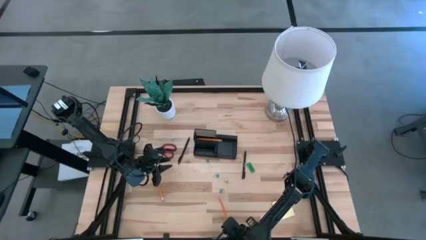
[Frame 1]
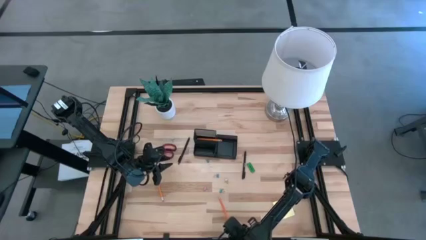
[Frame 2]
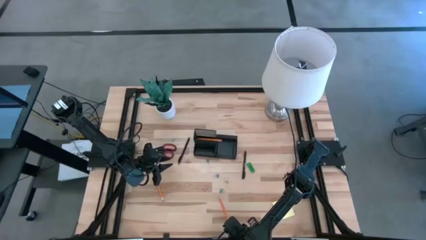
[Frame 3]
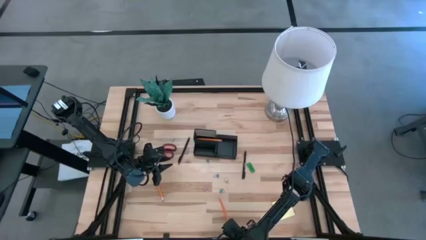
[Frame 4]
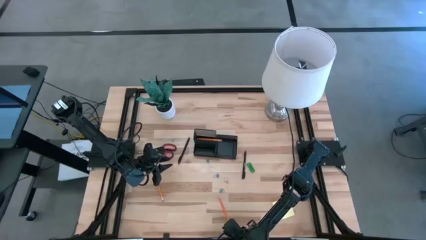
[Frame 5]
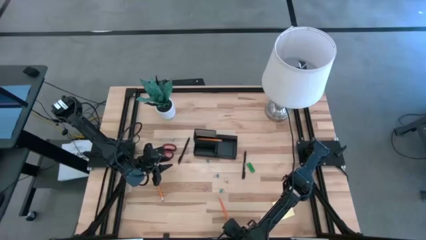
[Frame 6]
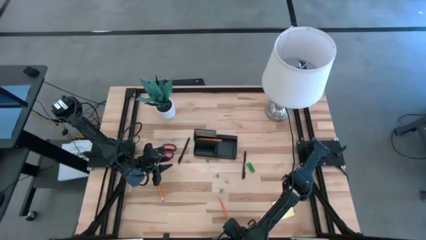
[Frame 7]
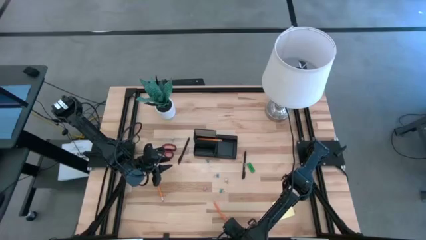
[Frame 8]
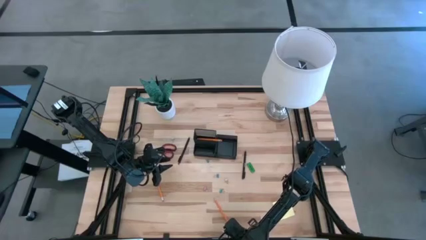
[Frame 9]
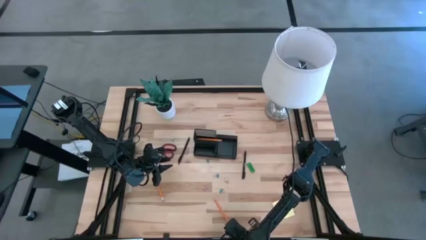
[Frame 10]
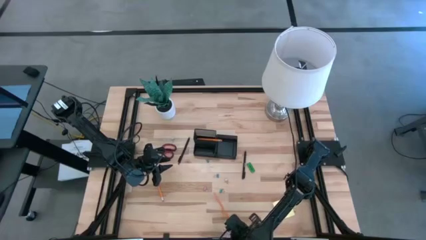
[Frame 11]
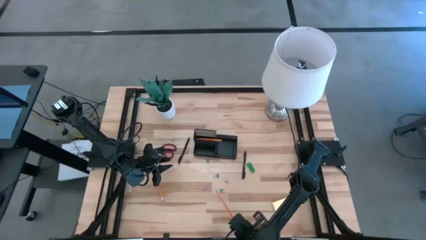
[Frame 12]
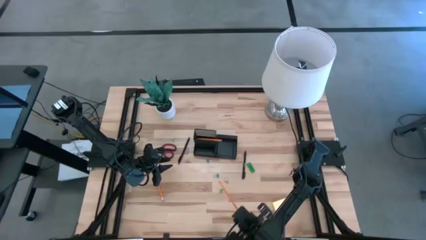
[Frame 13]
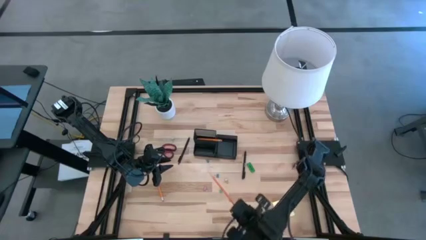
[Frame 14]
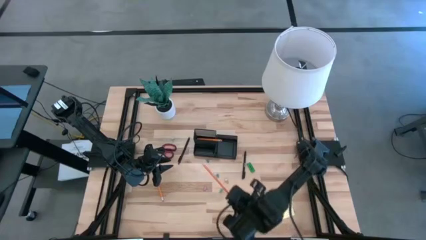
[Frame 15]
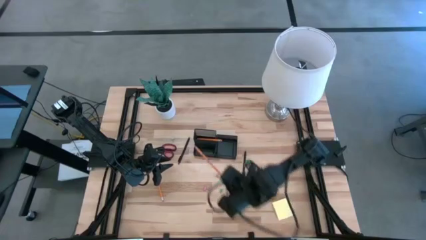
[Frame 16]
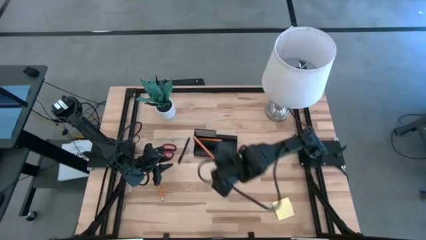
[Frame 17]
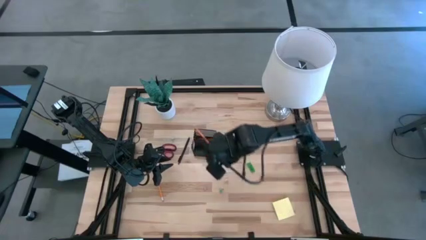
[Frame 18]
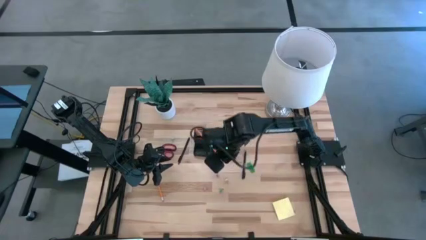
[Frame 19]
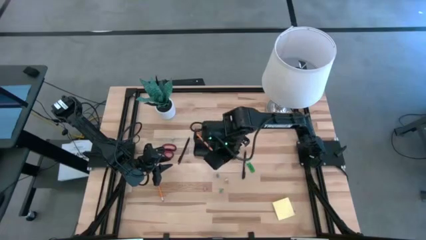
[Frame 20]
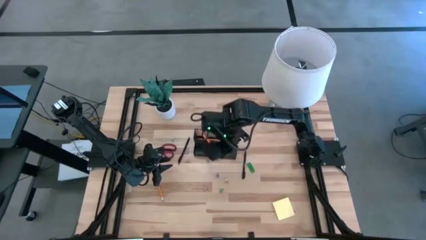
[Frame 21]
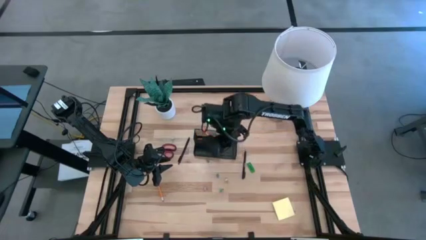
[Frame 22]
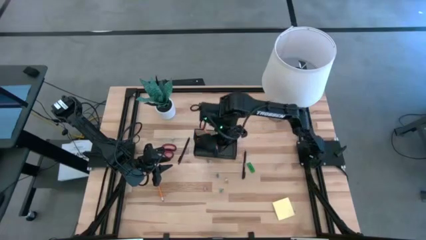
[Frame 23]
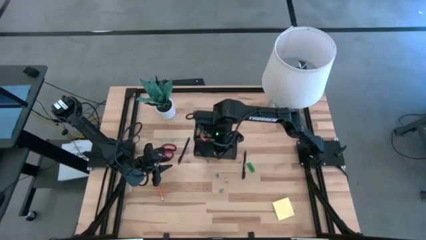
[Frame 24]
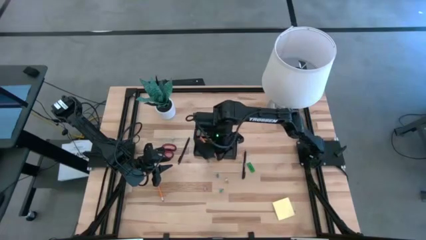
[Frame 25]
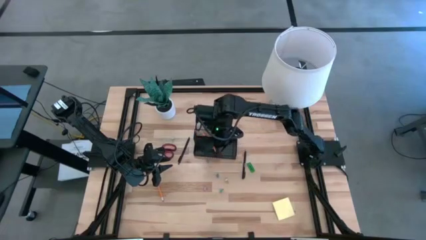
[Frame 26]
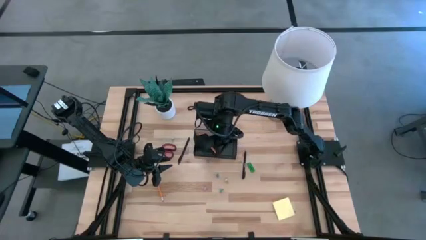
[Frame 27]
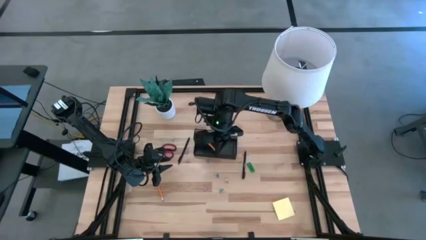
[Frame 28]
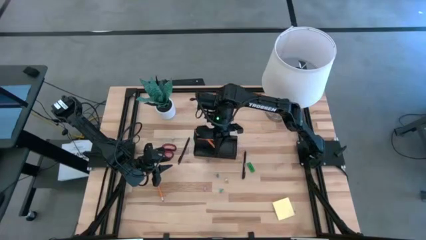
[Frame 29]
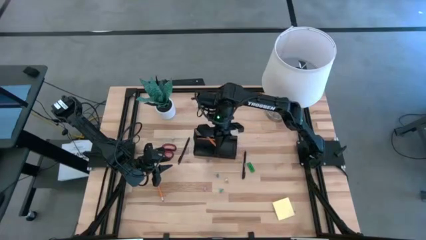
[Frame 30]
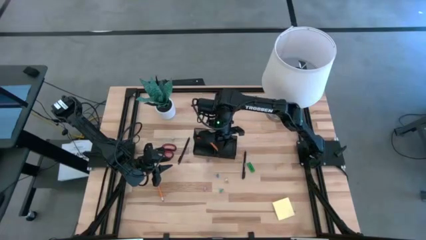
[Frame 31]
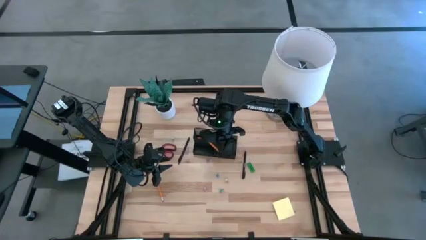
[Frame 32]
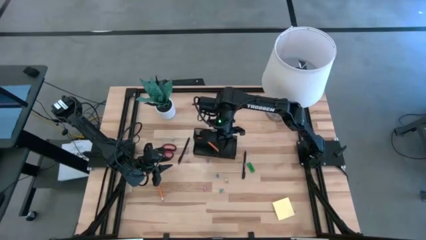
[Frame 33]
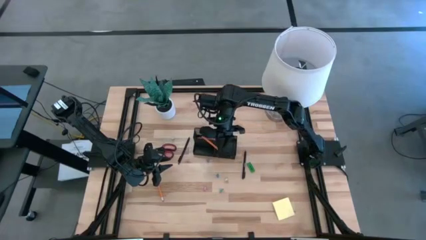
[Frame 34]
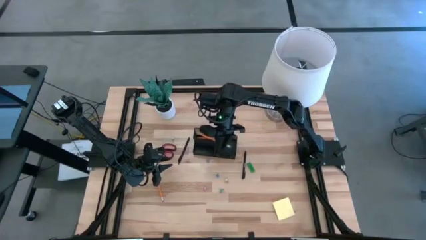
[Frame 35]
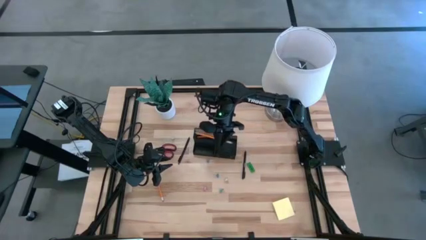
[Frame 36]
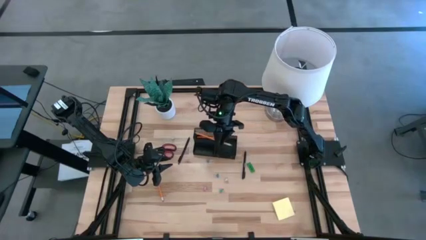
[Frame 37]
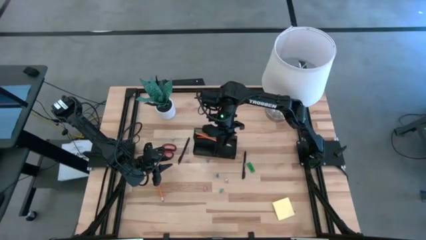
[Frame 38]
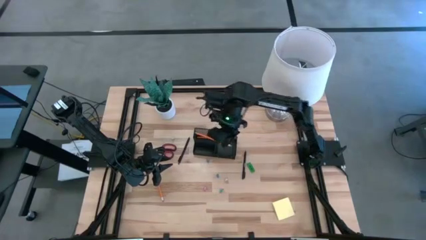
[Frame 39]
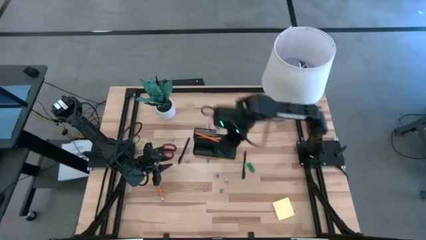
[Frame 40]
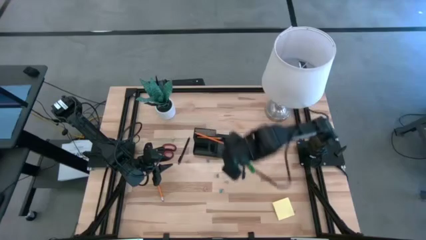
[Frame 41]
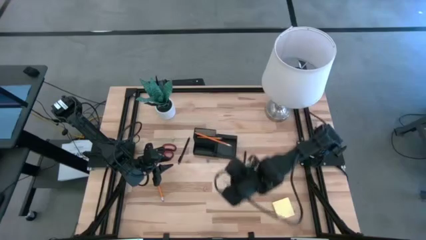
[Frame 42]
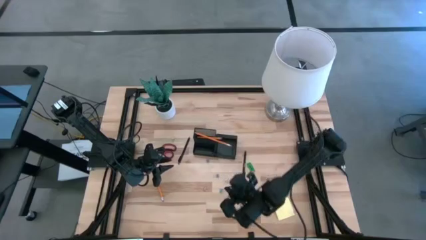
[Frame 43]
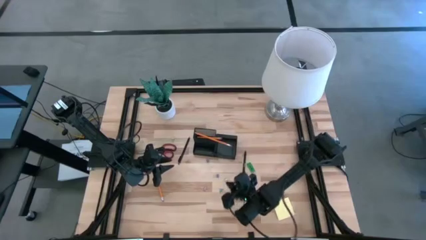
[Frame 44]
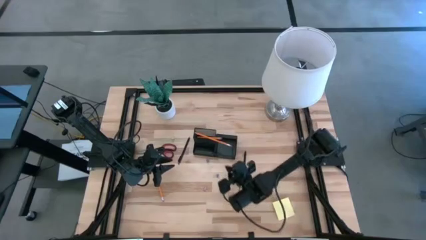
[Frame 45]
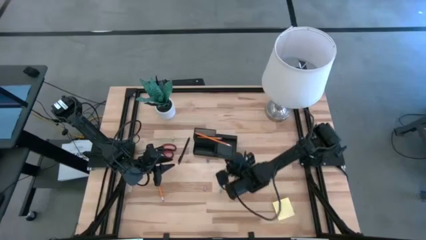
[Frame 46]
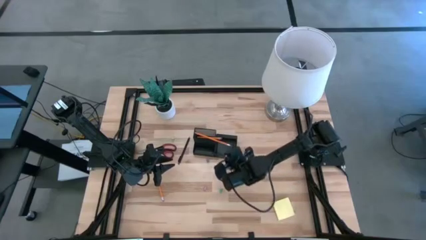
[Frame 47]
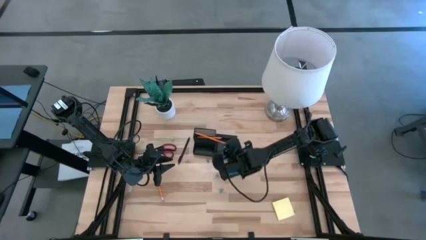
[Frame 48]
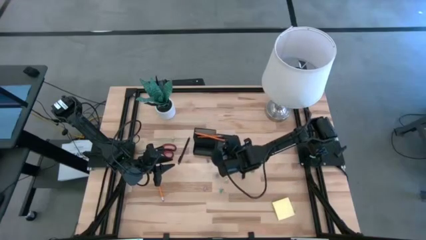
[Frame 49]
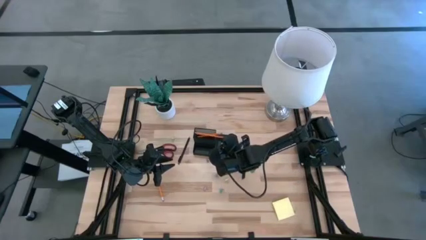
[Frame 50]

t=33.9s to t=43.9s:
Task: Pick and place office supplies into organizer
Put the bottom orange pencil into the black desk organizer

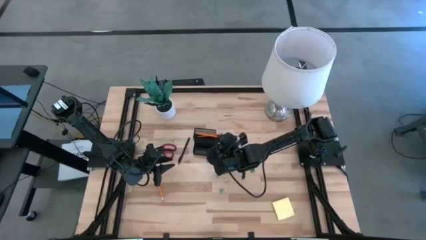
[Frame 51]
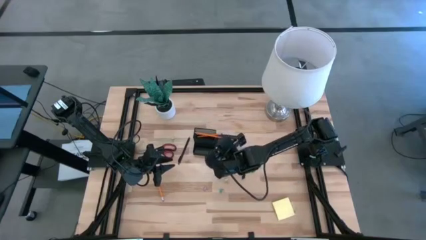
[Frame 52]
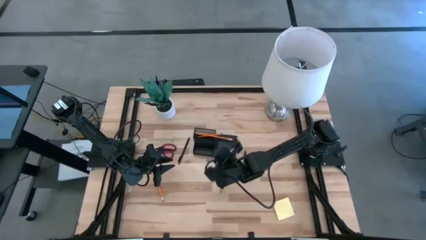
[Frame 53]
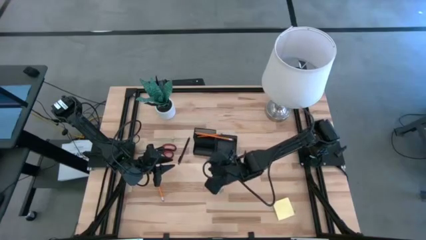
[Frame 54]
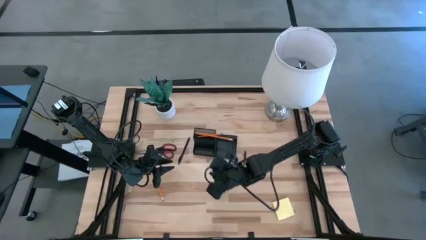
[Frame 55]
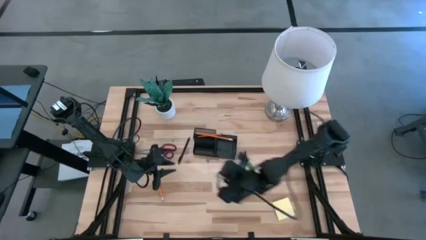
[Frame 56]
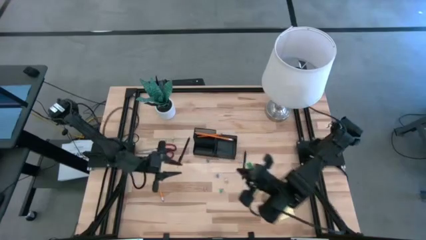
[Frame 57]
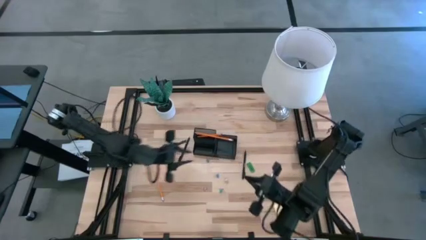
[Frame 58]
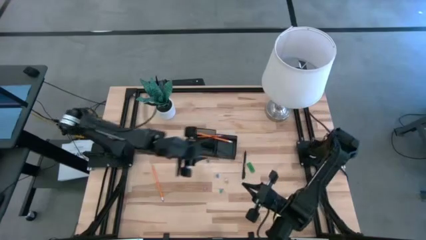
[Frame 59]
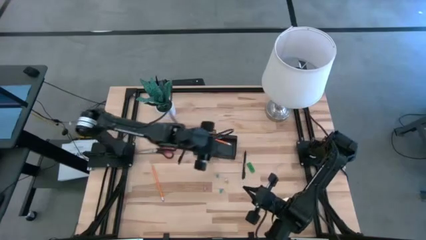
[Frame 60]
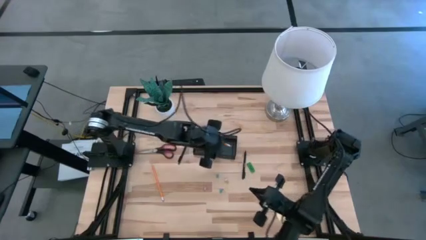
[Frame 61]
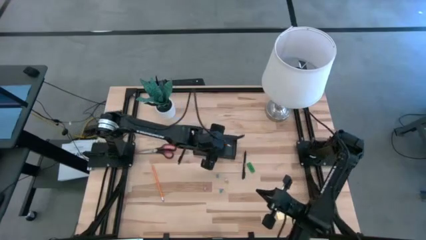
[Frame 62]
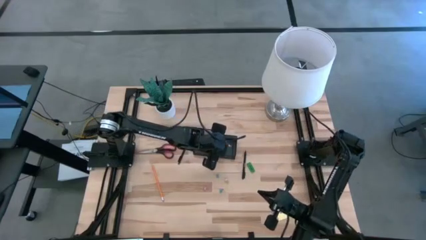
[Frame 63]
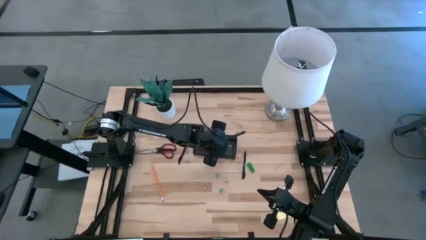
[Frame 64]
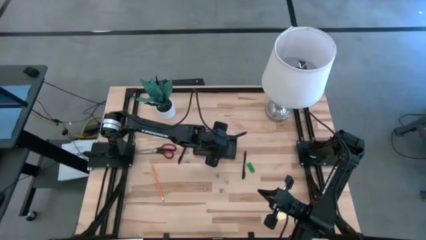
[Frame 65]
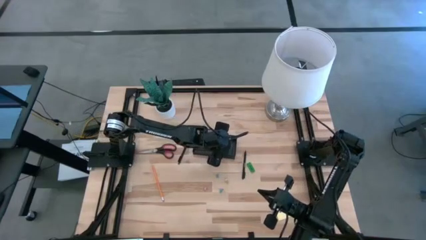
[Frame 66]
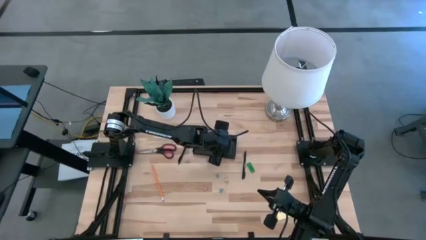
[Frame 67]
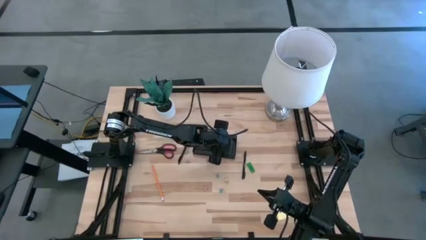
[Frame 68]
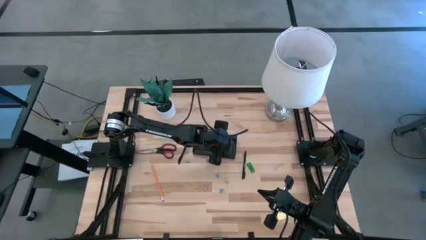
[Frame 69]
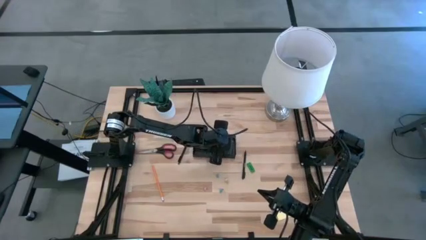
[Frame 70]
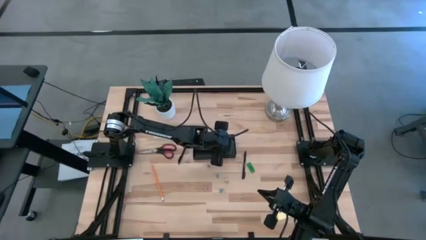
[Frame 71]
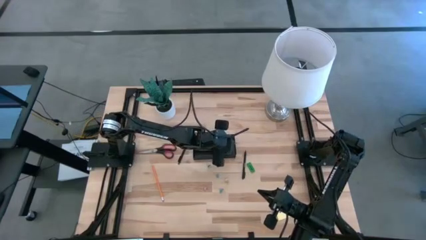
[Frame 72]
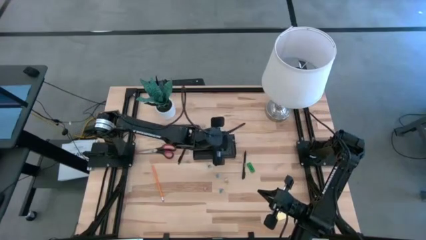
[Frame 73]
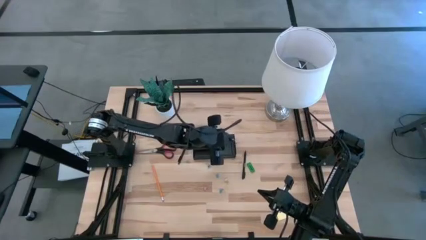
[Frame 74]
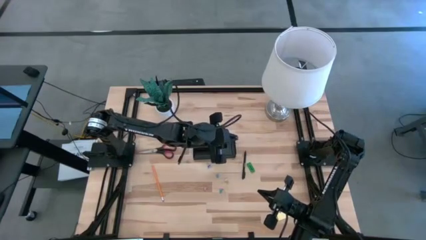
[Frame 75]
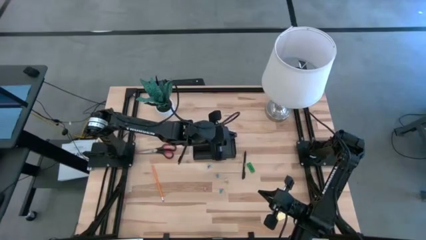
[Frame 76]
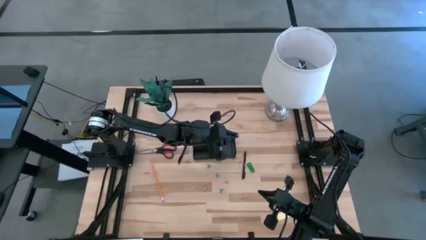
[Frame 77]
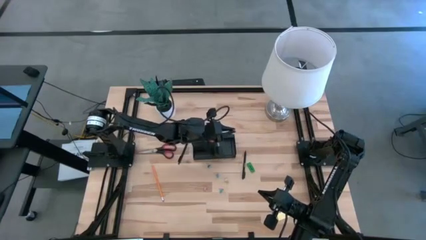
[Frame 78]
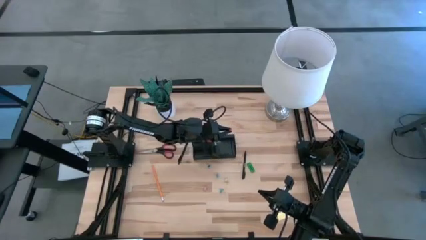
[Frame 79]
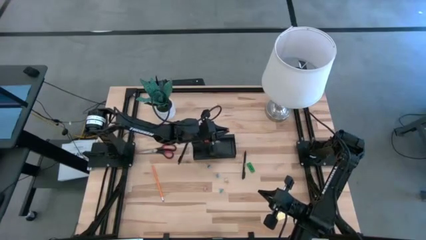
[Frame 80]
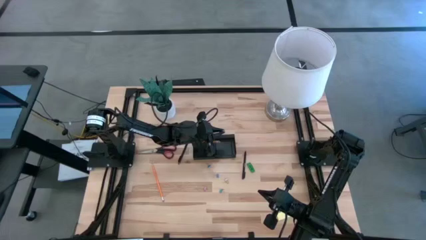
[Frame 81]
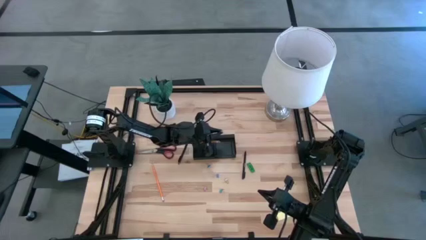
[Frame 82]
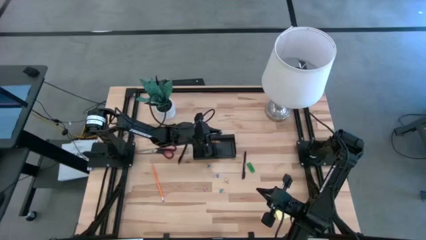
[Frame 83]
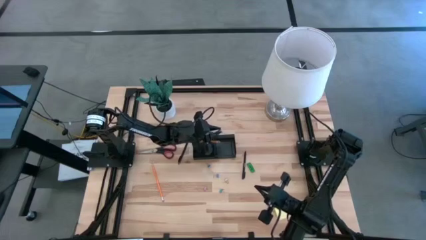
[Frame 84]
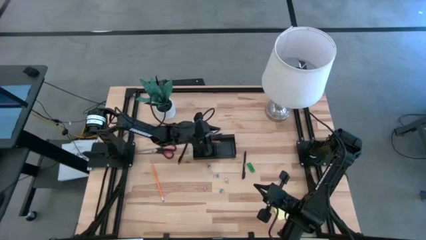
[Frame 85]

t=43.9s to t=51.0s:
Put the bottom orange pencil into the black desk organizer
